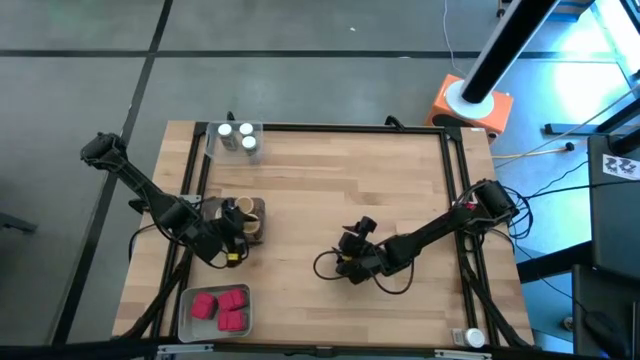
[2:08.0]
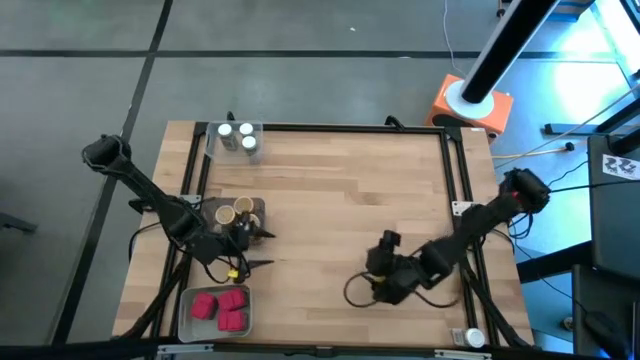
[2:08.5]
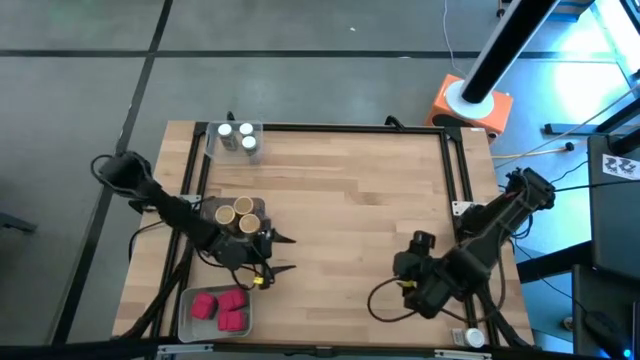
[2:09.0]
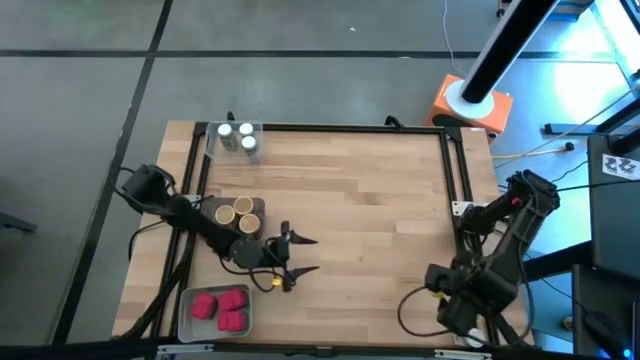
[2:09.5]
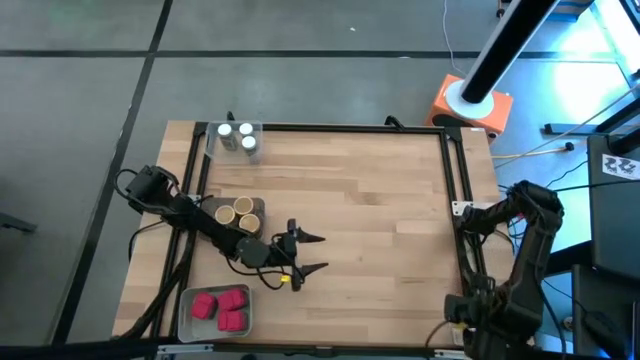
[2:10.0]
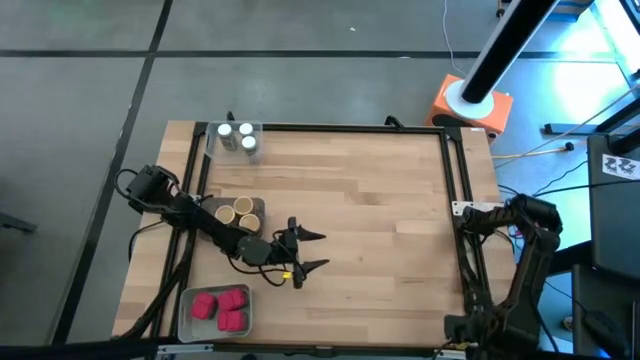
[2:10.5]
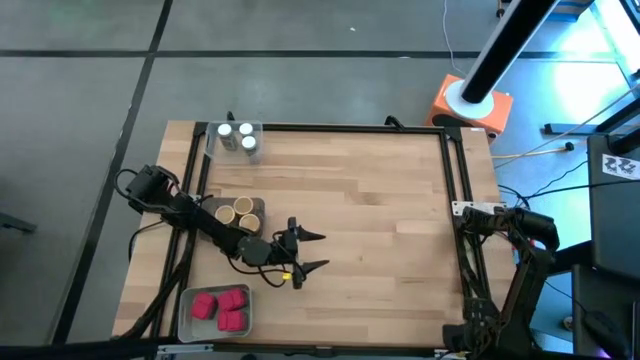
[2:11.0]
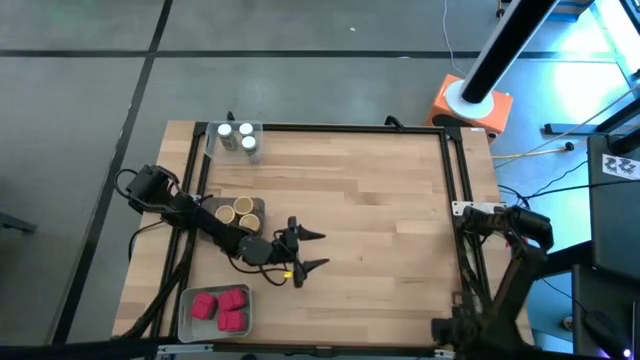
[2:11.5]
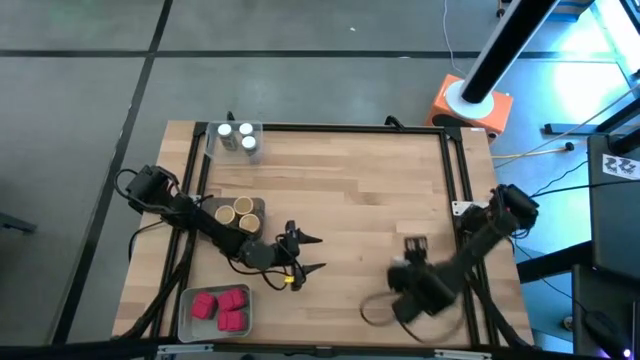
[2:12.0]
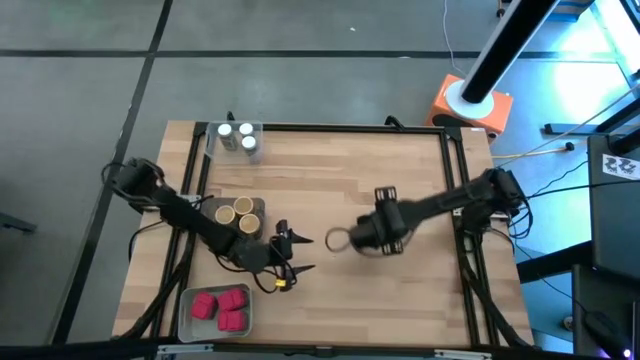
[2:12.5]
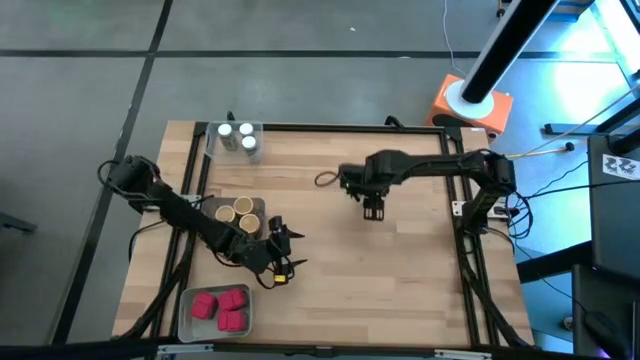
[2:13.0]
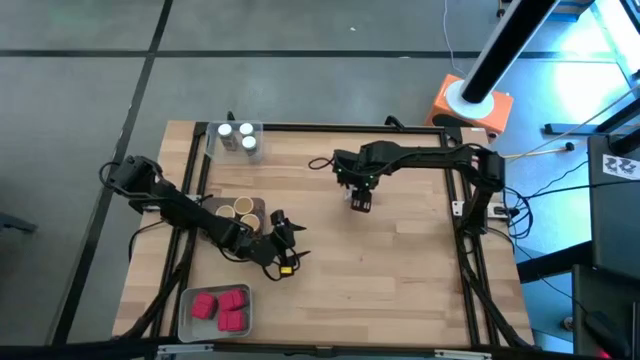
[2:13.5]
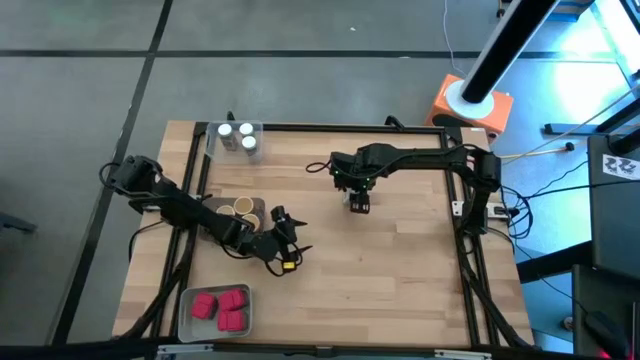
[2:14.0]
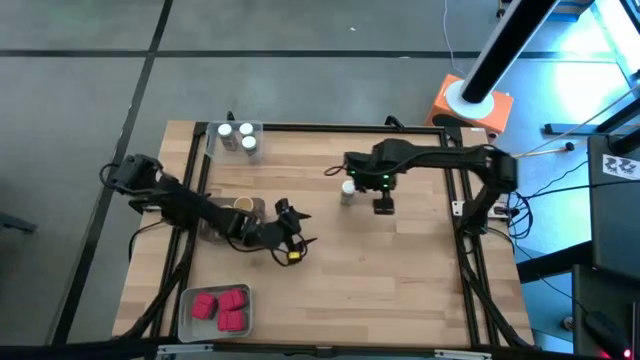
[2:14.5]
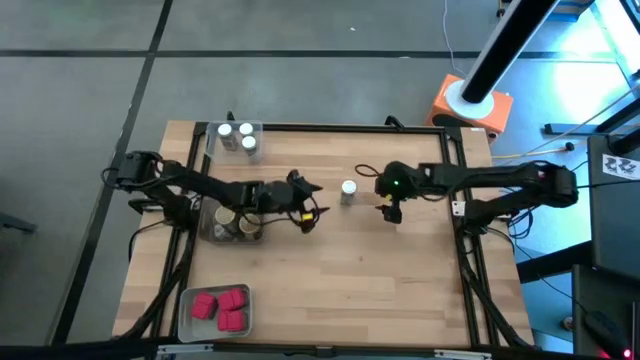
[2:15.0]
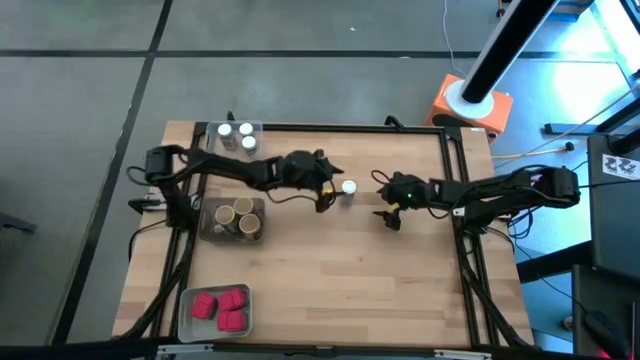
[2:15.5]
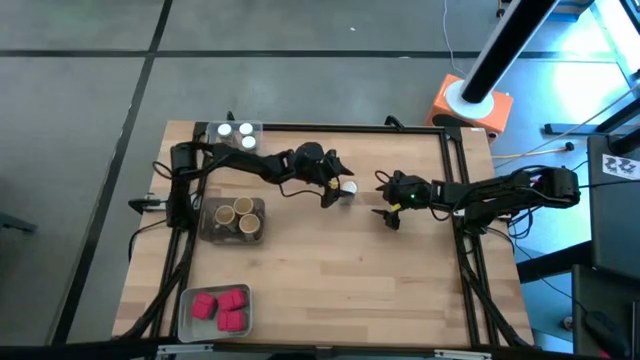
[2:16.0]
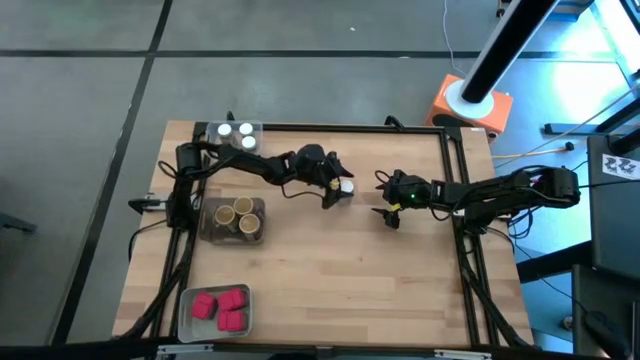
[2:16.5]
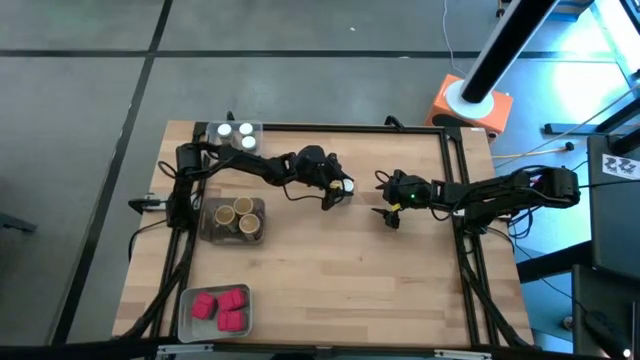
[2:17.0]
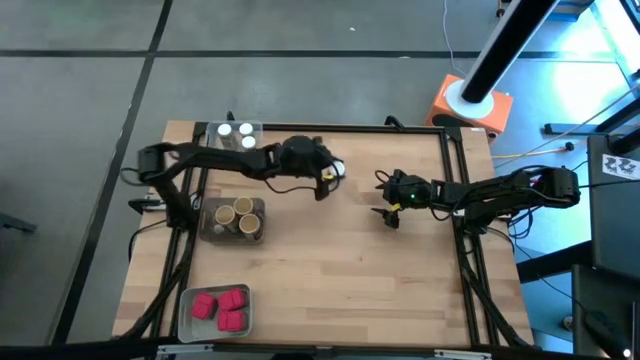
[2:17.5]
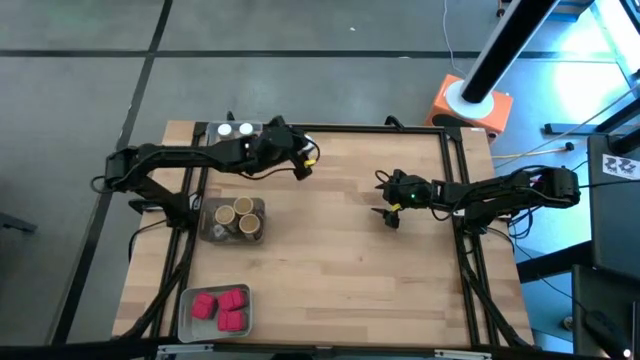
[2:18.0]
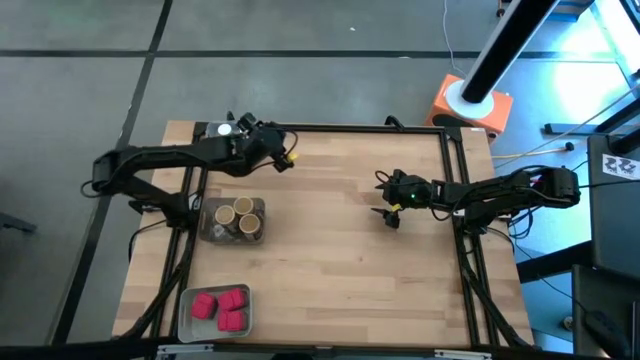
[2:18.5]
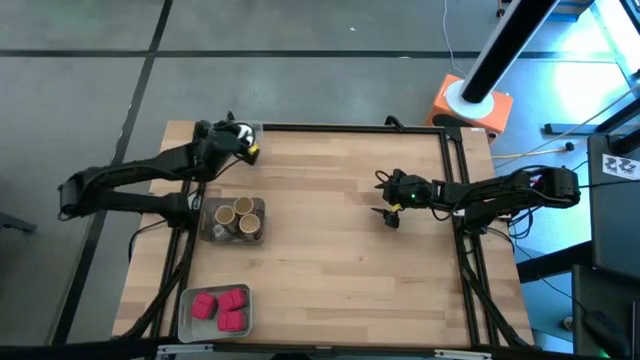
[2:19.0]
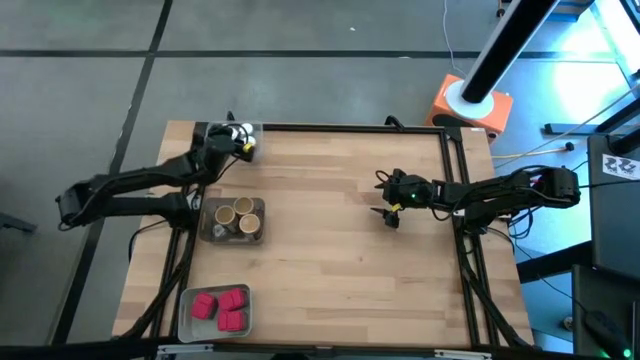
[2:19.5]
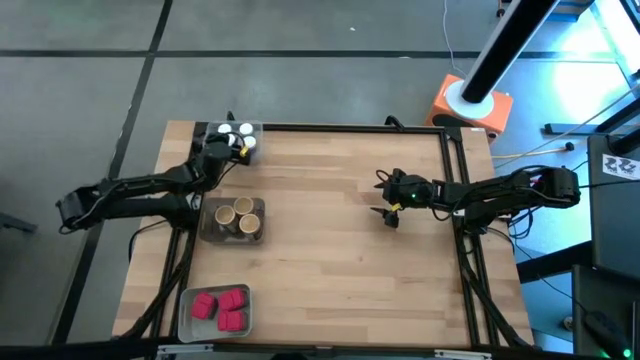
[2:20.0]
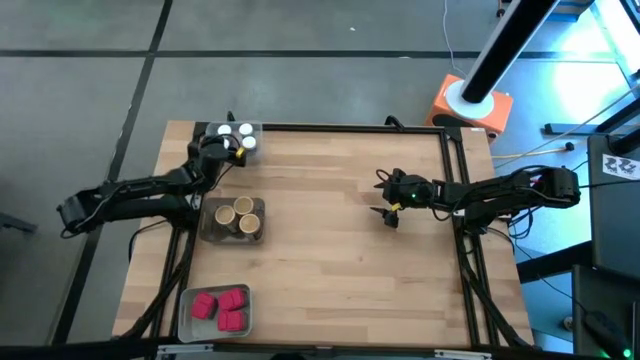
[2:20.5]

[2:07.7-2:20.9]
Task: Sort spices by type
Put the white spice bottle into the transparent bin

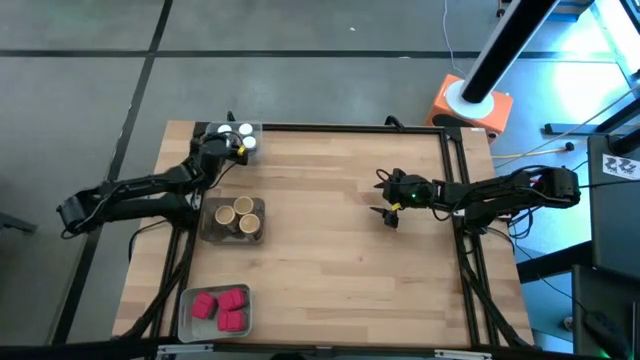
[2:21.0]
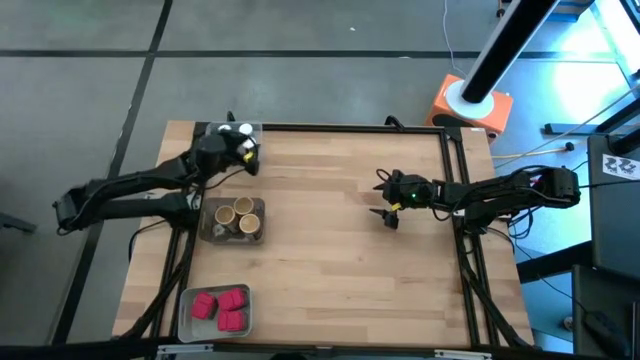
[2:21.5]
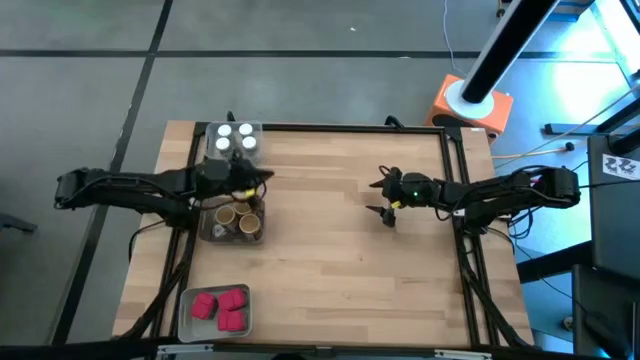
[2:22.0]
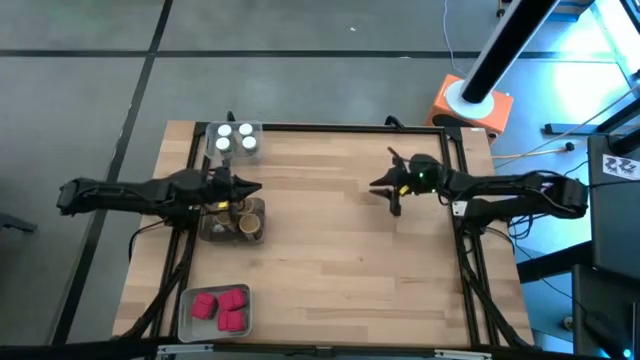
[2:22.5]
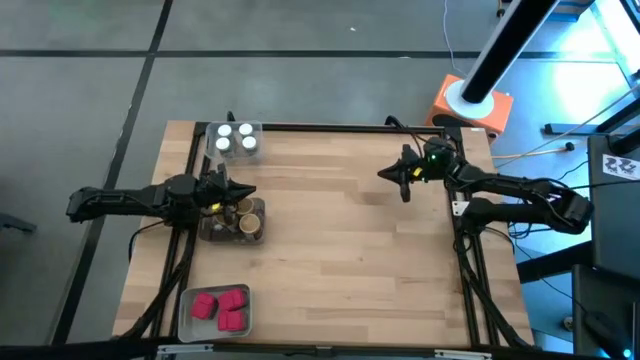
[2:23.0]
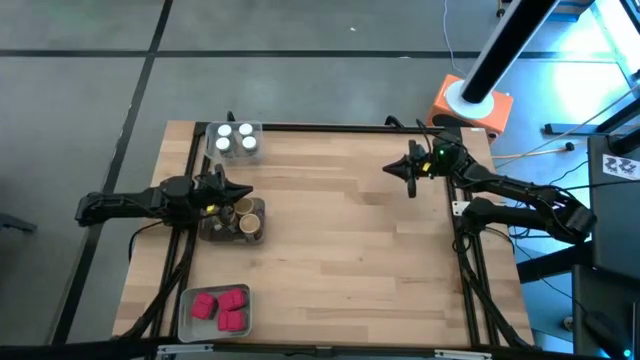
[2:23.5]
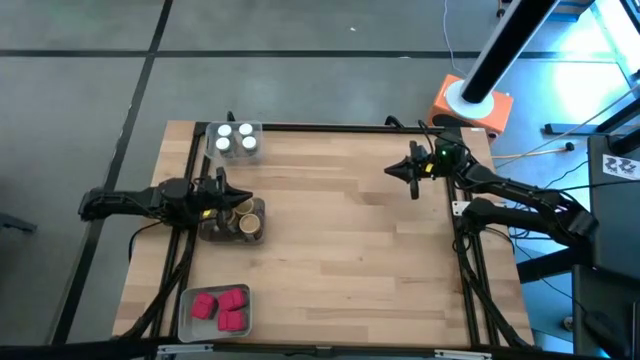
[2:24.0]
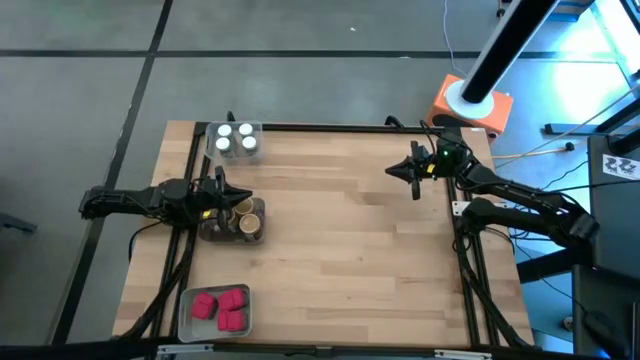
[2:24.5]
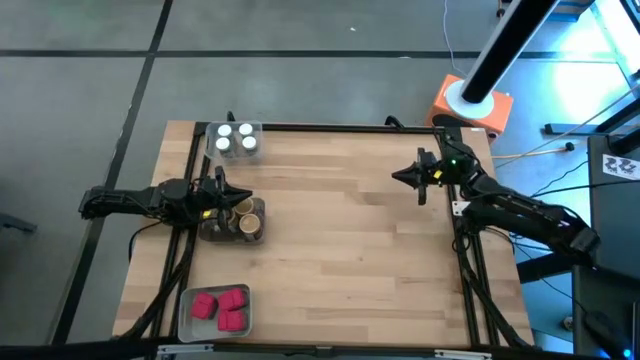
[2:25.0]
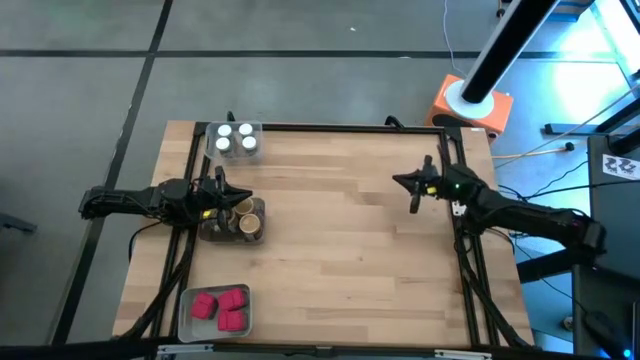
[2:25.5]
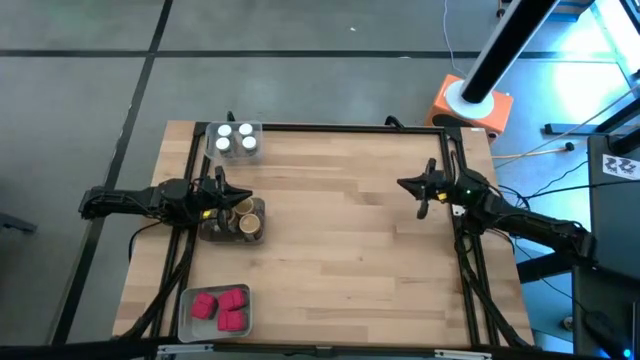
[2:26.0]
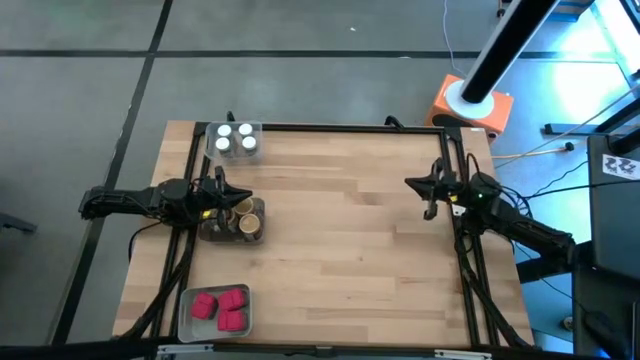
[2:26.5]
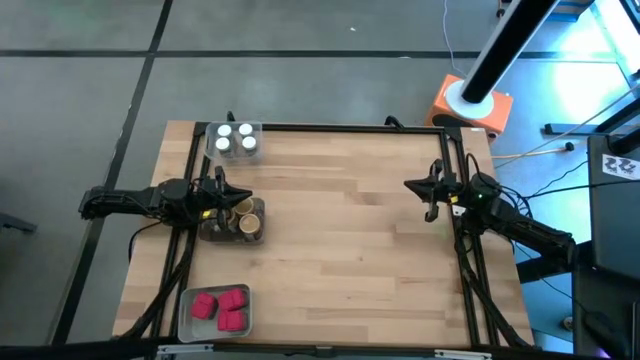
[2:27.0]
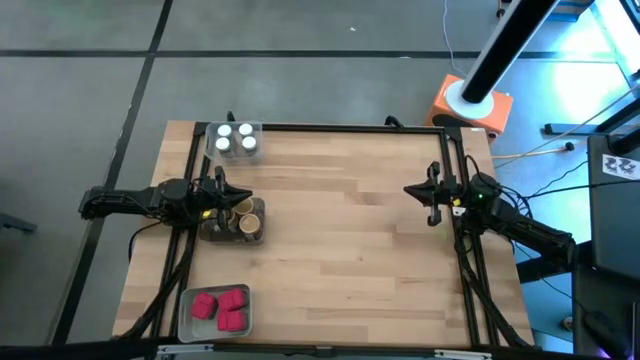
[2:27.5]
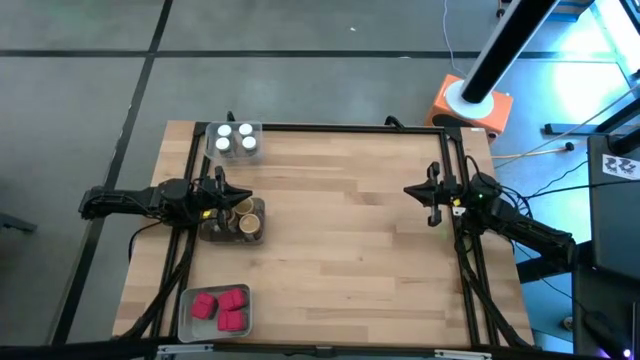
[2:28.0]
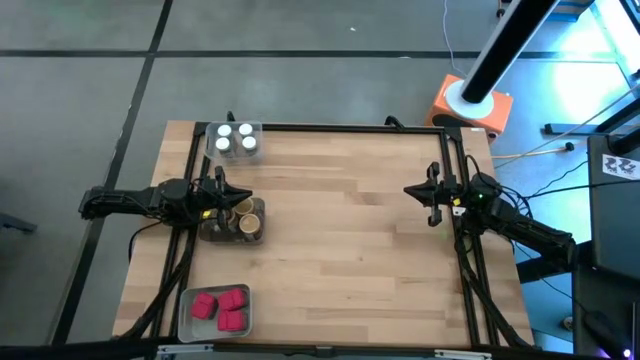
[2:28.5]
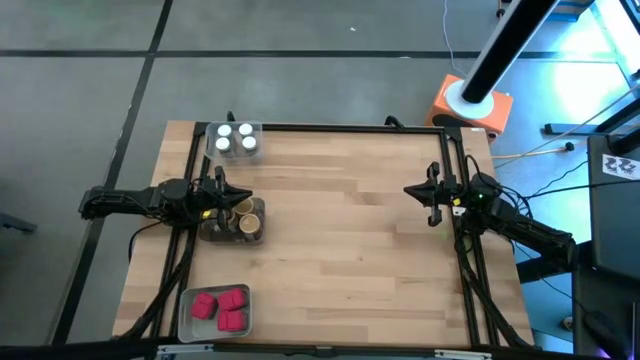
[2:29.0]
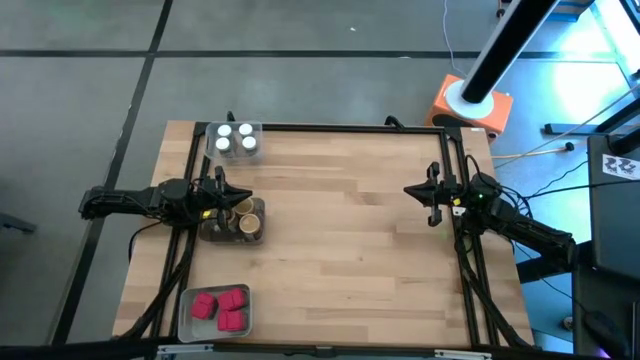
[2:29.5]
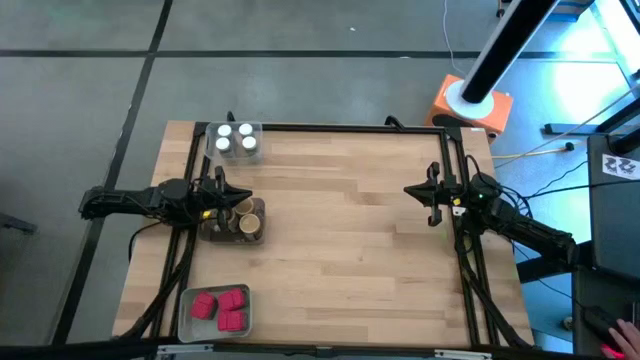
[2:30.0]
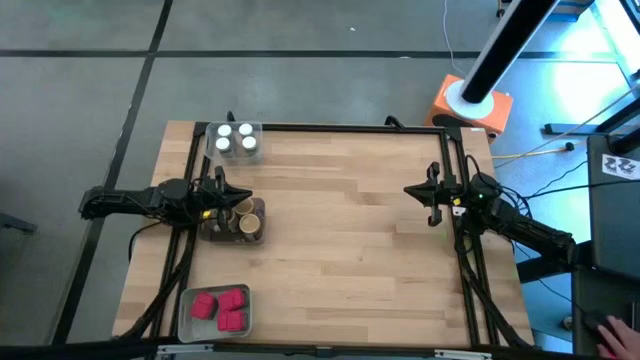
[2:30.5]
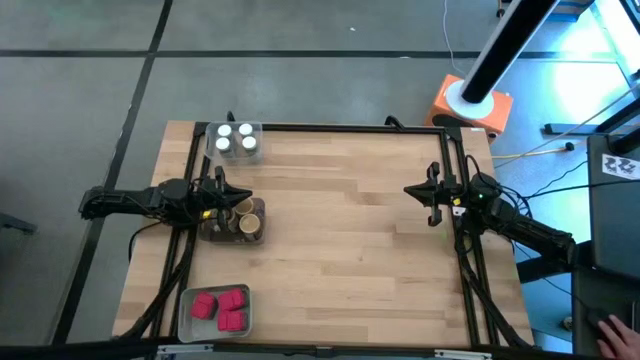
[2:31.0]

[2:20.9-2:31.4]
Return to Home Position
